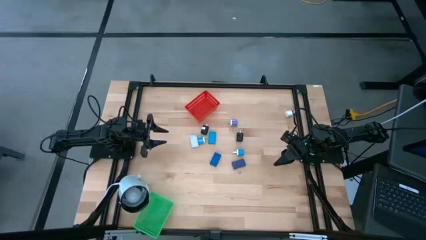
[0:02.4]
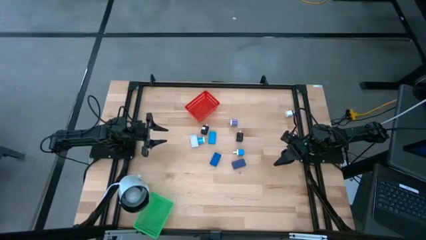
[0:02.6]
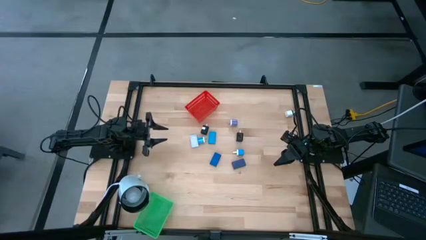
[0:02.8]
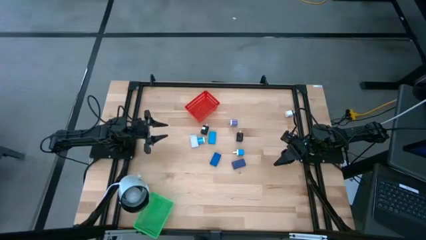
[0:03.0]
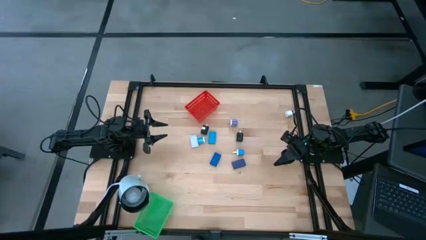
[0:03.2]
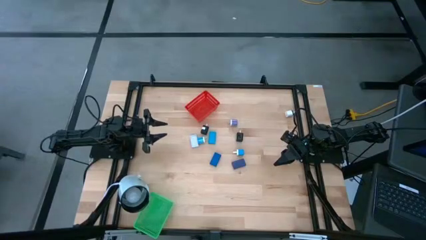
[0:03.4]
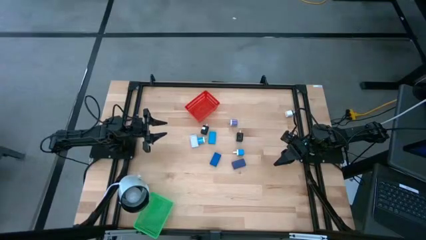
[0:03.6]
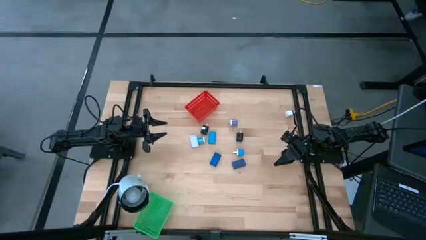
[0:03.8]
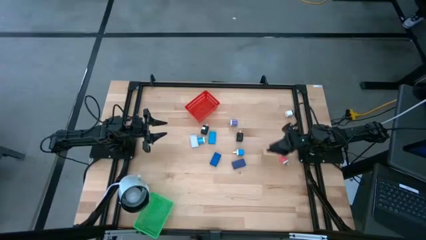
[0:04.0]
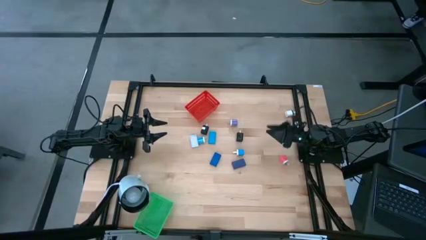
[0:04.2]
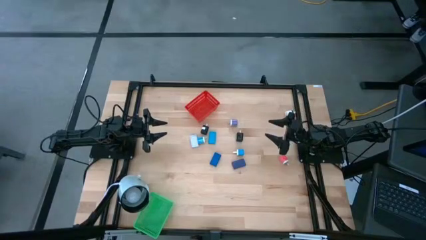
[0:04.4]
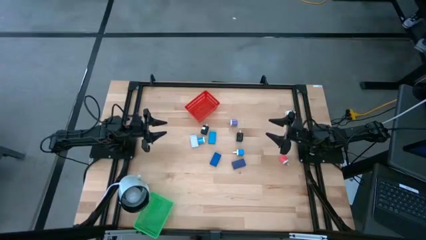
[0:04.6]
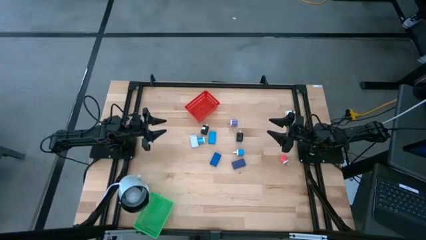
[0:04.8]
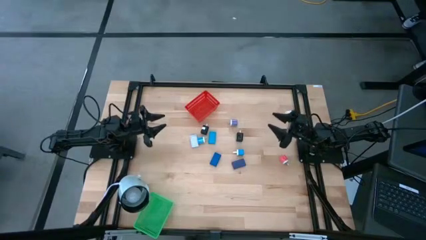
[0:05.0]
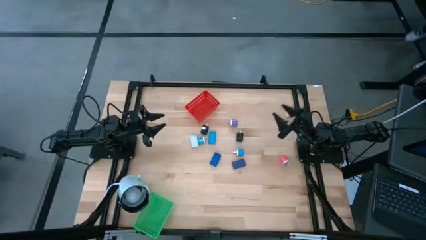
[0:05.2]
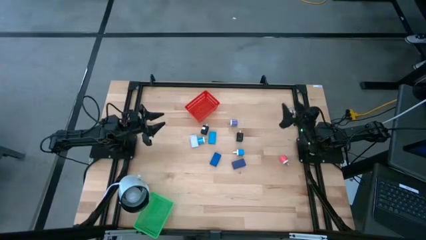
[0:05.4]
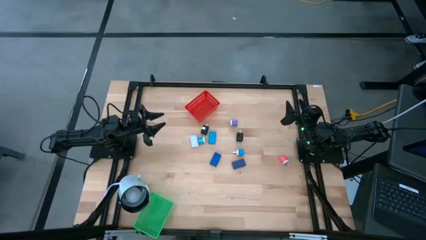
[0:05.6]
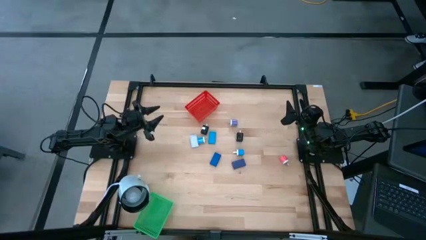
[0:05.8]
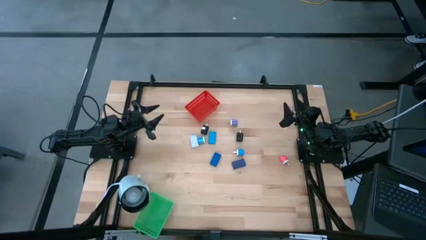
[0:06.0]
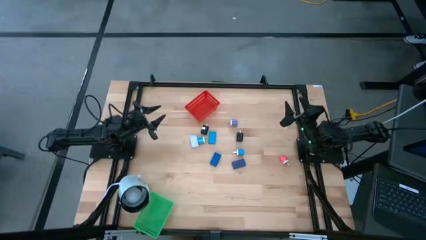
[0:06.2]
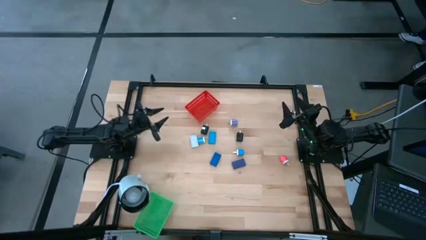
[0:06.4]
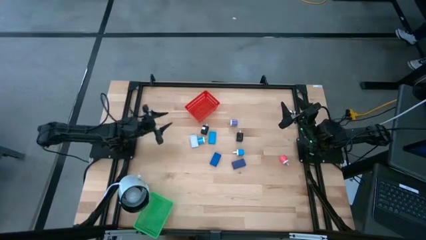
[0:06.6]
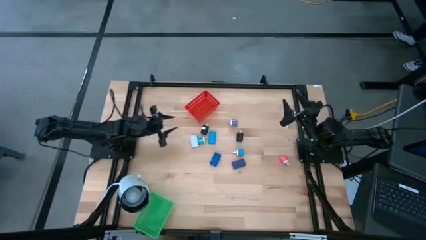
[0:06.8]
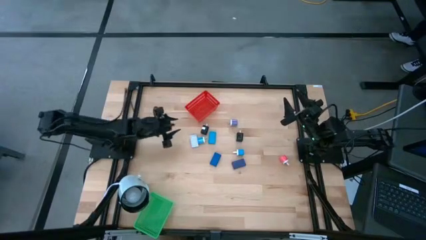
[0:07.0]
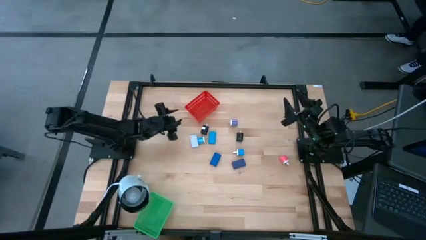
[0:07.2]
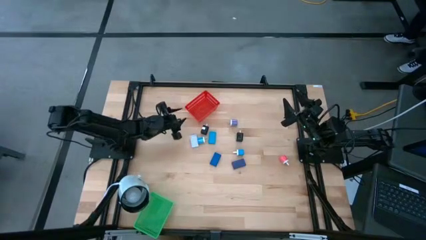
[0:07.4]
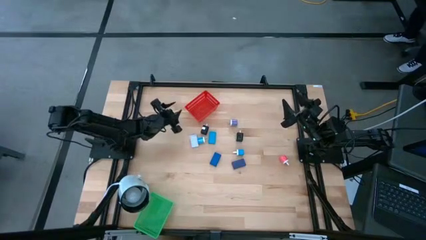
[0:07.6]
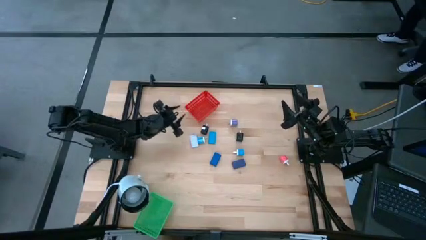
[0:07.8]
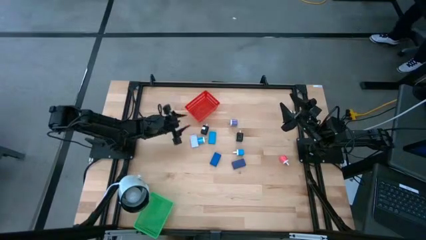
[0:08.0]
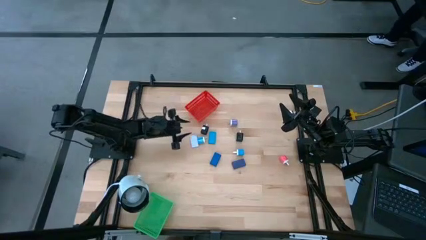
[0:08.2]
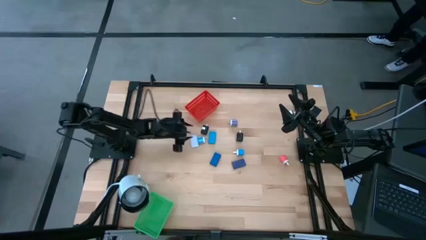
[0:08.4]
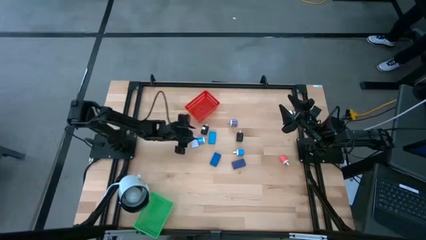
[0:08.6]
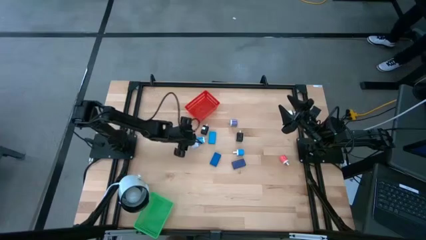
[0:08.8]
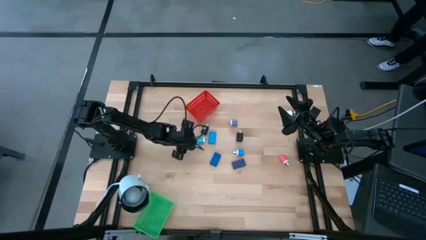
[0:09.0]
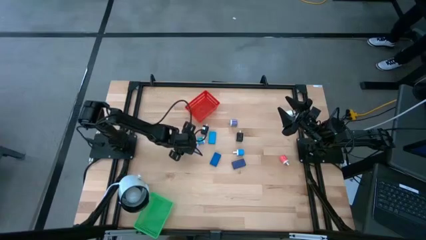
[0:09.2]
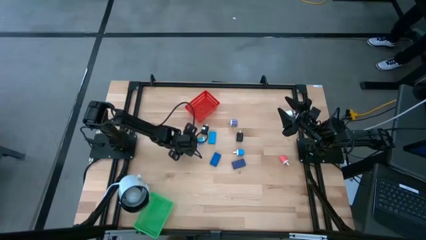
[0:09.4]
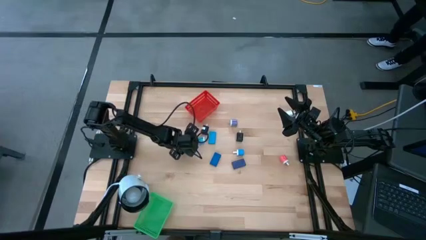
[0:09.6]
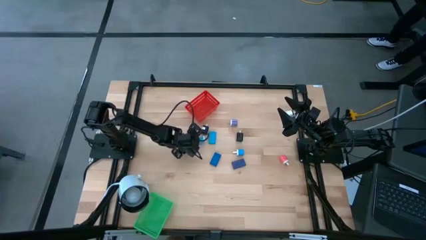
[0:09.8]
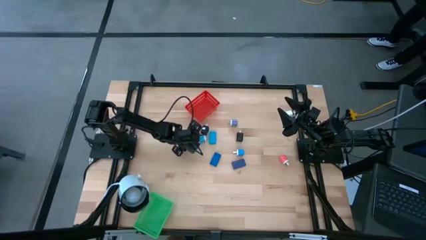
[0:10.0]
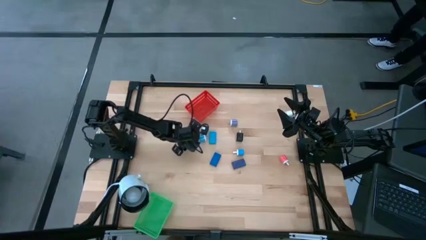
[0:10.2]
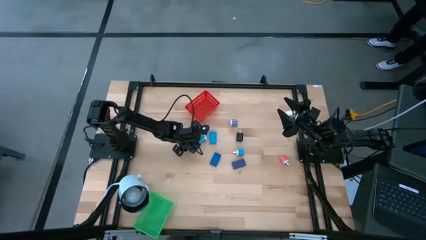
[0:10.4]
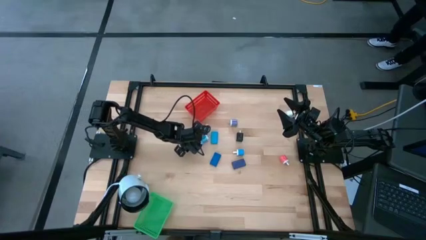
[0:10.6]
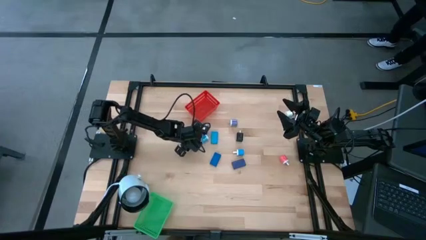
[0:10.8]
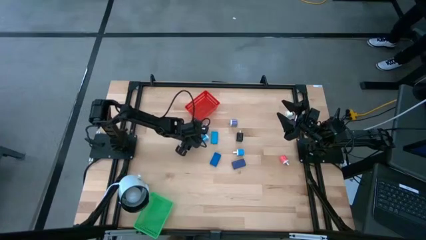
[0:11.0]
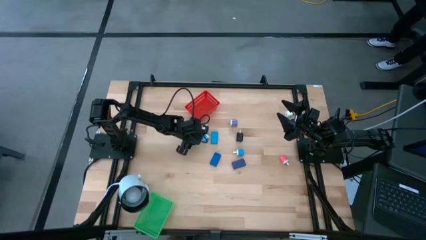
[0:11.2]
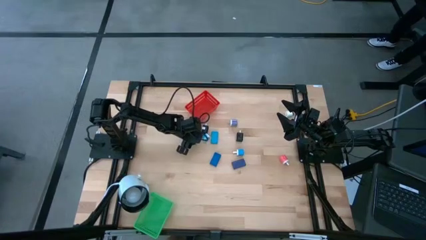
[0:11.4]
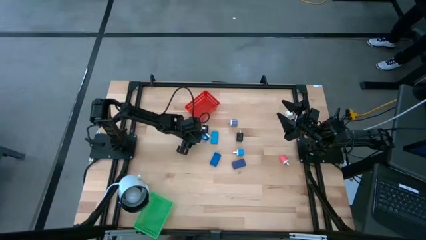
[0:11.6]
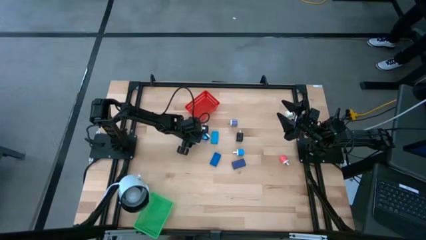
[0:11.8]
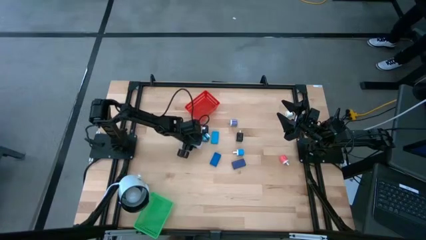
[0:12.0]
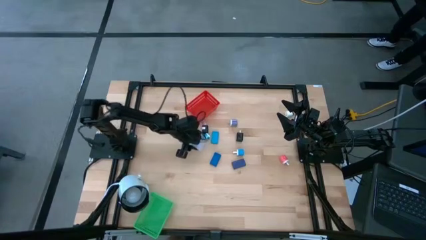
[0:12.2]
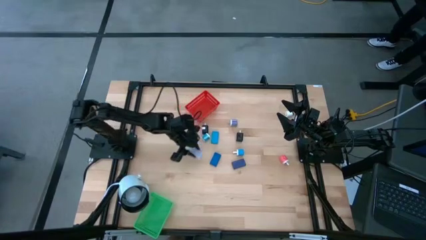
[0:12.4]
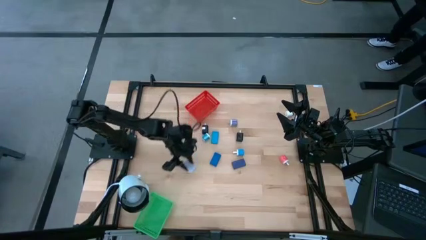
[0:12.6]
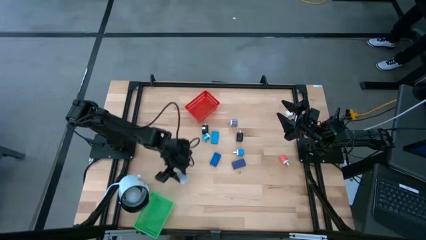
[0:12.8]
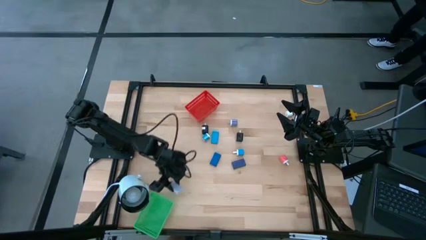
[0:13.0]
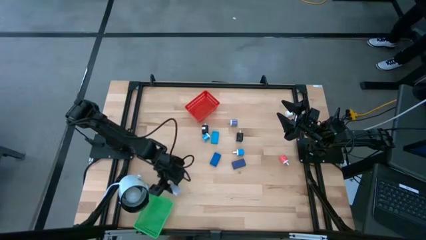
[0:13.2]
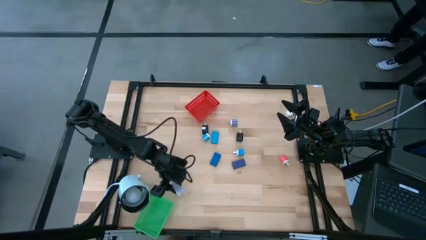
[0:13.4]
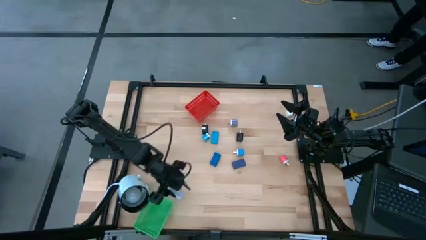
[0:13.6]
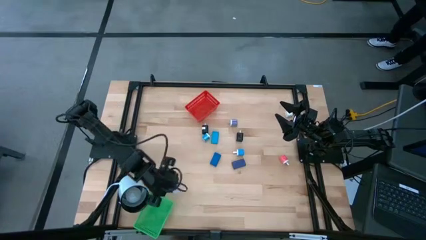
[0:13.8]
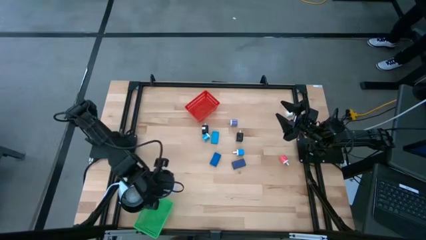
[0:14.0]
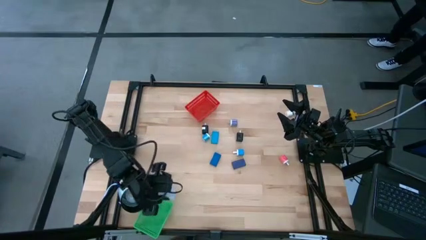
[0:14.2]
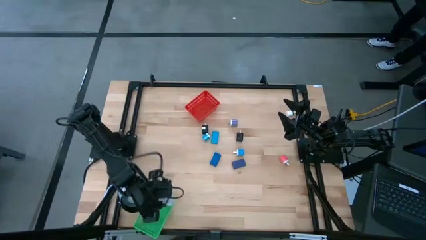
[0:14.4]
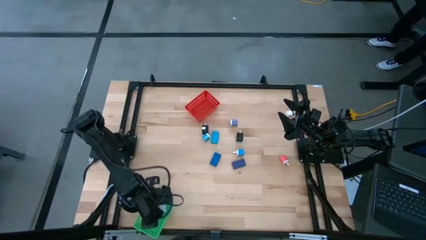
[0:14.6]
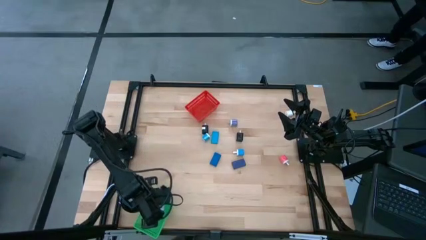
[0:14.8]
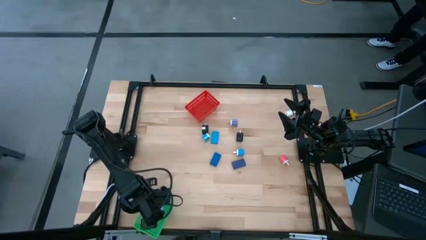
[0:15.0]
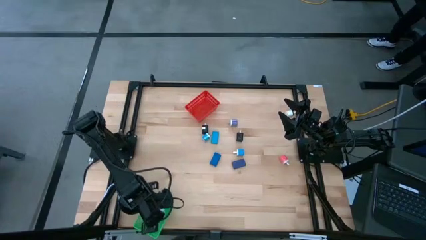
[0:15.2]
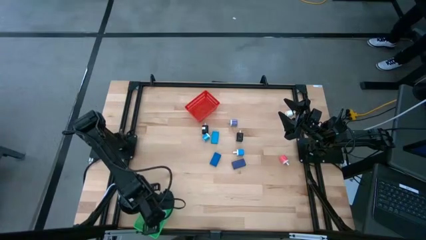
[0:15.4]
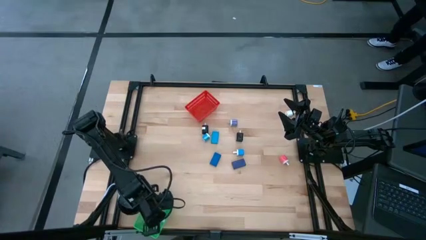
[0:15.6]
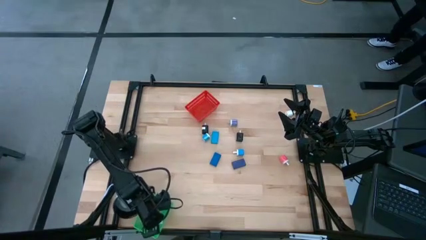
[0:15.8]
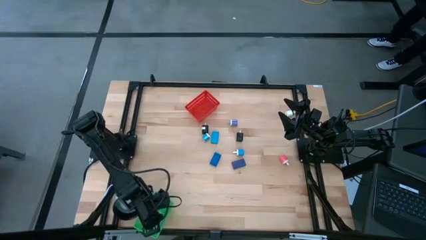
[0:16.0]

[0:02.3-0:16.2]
Task: Pick & Place Office items
Put the white digital clock into the green bin

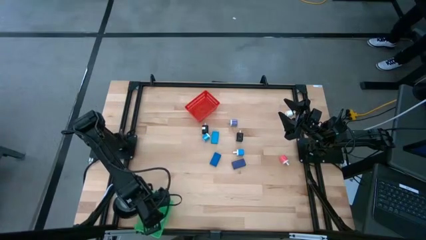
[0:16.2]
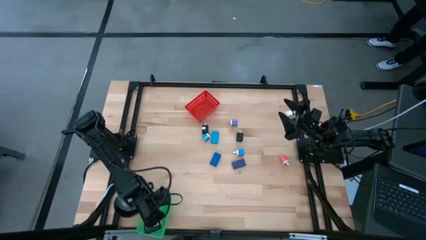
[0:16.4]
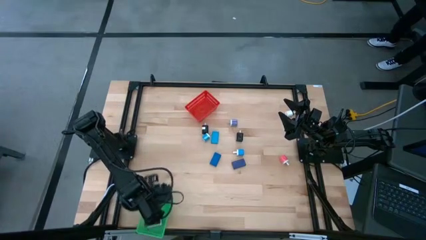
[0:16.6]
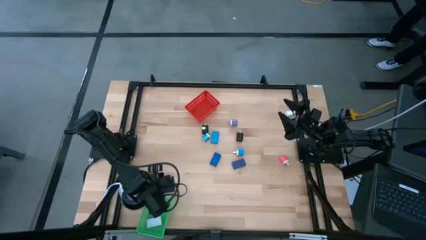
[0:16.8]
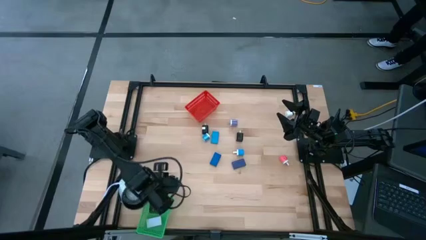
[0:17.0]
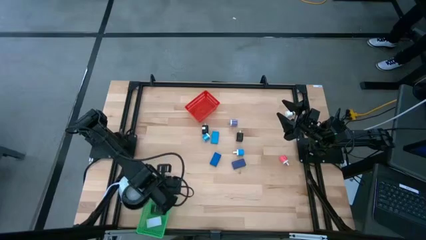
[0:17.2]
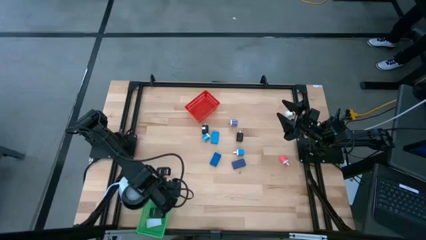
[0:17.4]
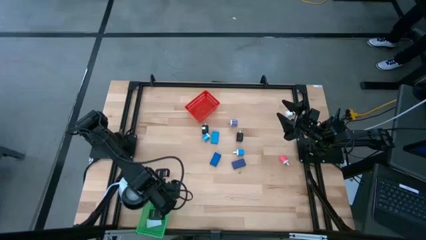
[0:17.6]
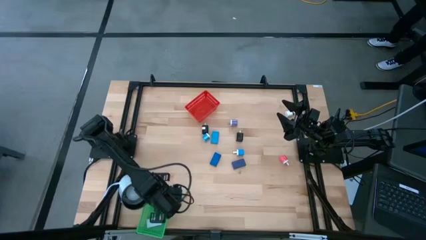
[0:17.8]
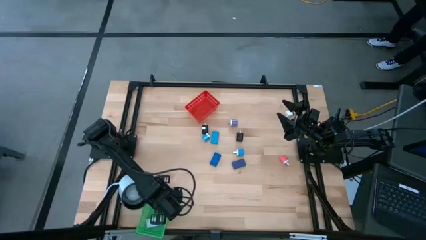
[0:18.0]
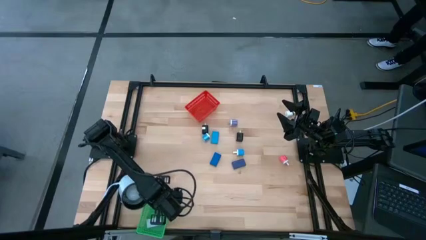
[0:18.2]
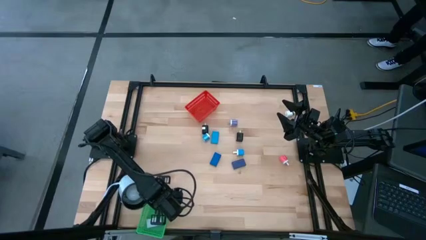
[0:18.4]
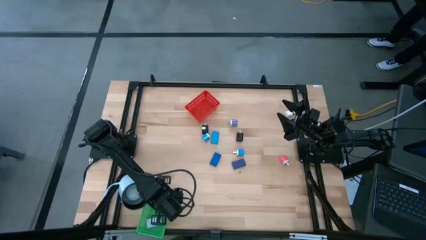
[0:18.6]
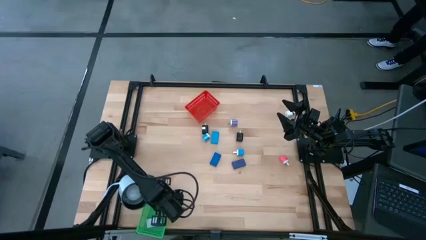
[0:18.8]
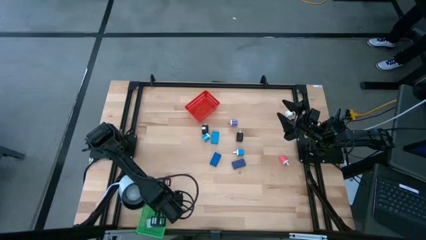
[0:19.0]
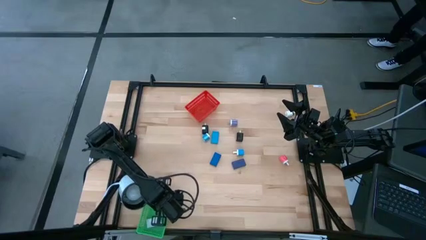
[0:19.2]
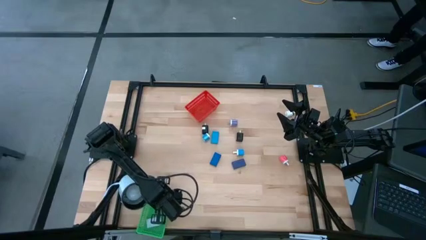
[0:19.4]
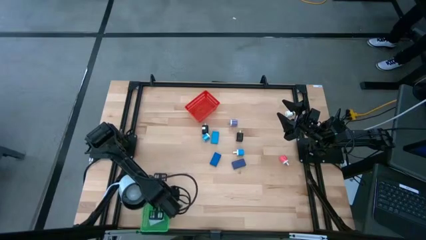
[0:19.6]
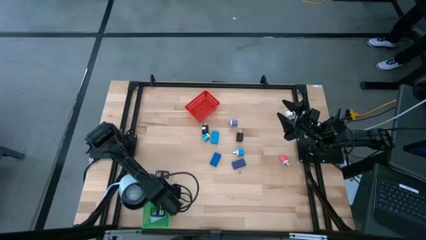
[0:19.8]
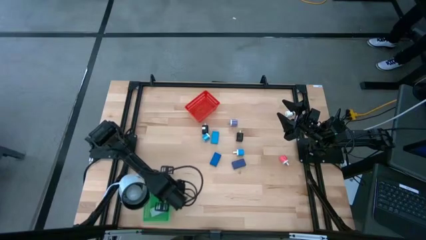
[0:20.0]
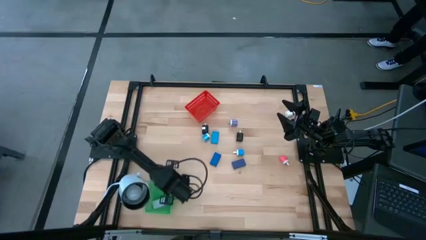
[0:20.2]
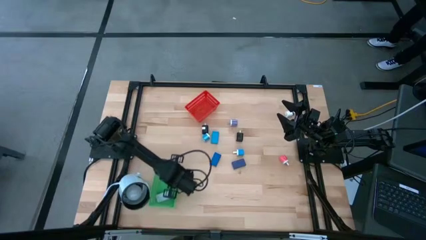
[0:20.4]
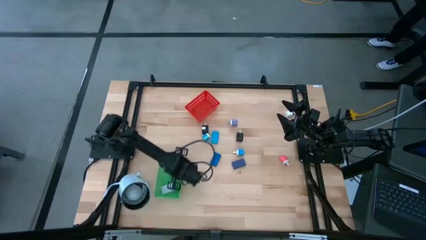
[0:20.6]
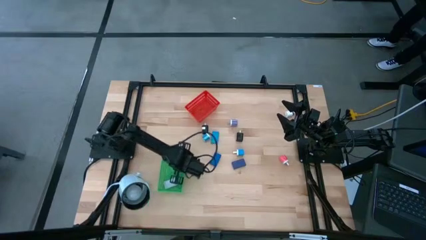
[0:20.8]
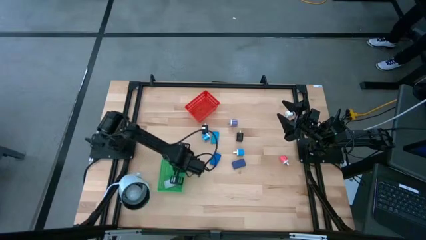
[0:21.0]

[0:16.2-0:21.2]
Adjust the green bin
